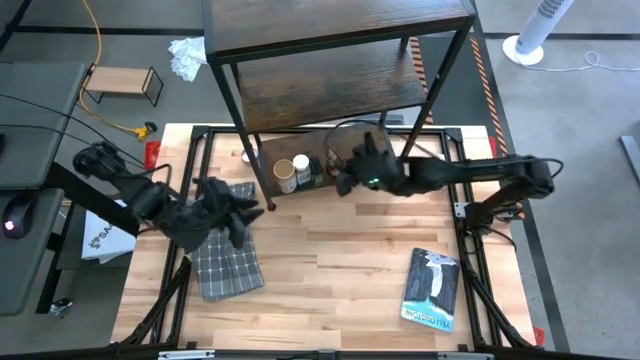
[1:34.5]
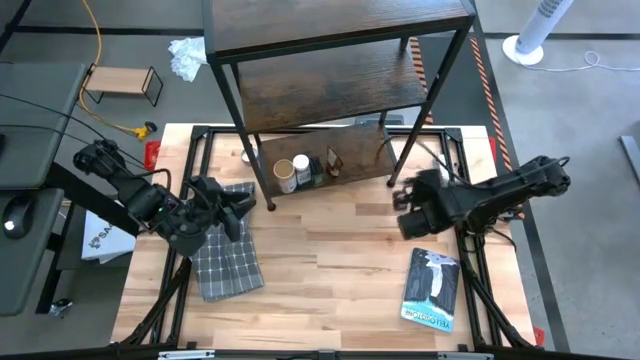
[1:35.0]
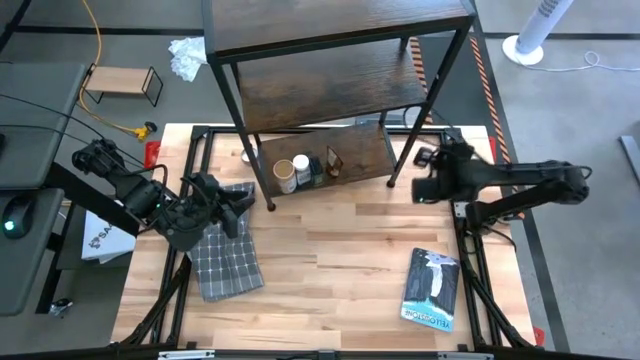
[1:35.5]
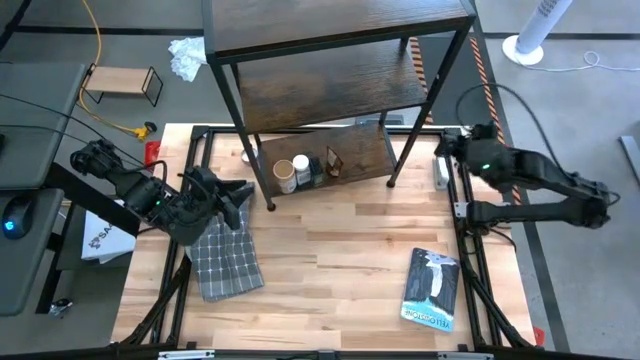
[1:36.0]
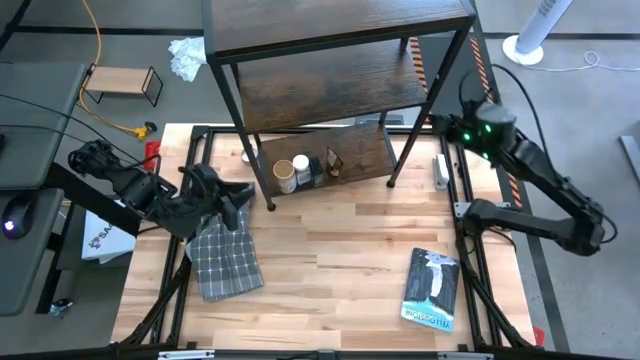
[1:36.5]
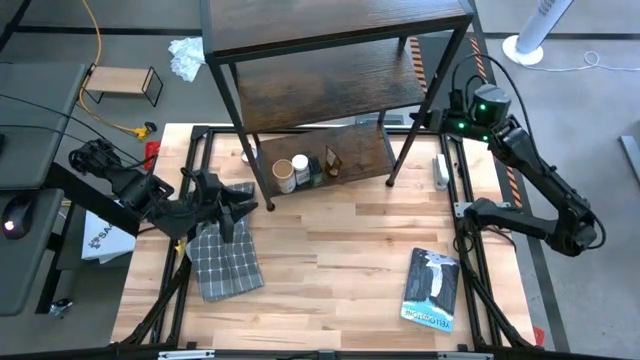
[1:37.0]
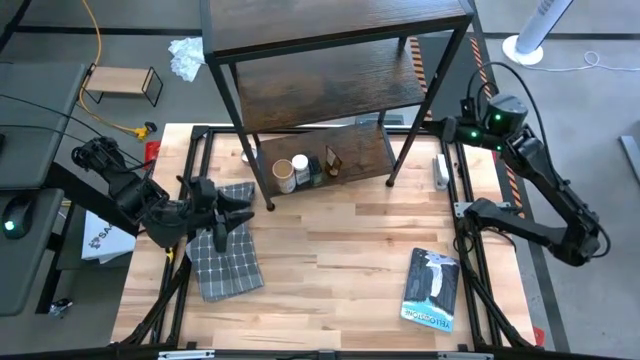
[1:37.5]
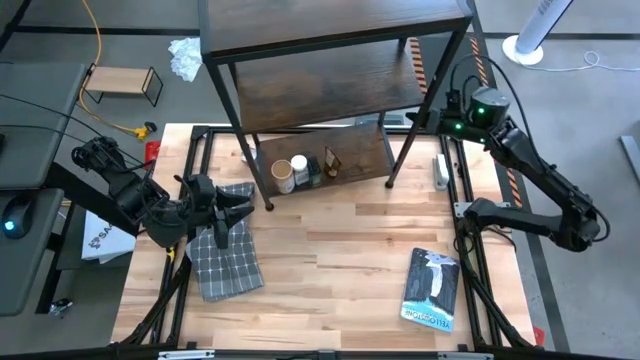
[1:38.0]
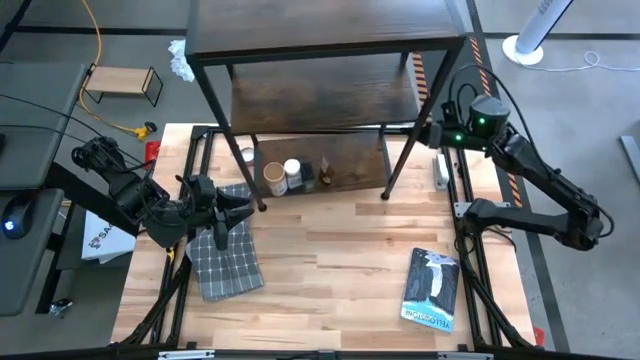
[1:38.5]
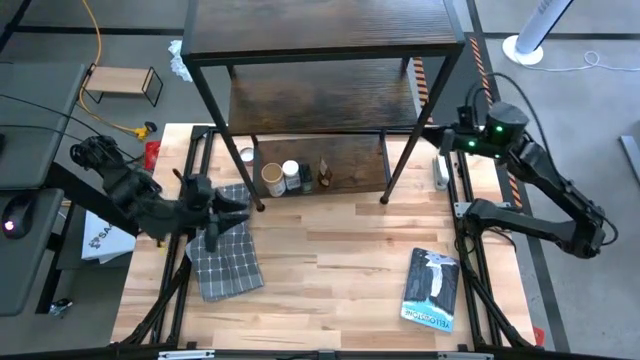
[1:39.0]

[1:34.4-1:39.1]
Task: Shelf spices
Adjust the shelf

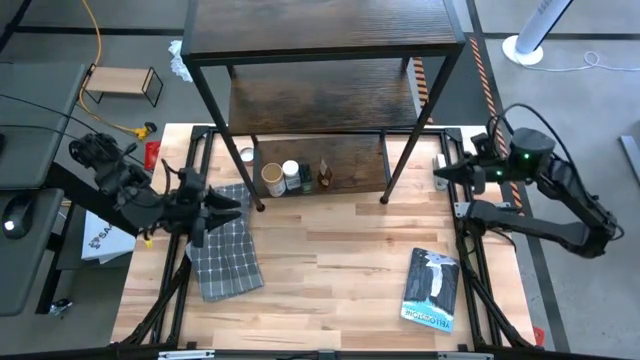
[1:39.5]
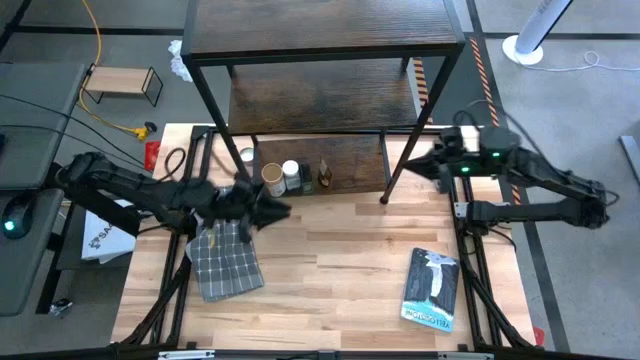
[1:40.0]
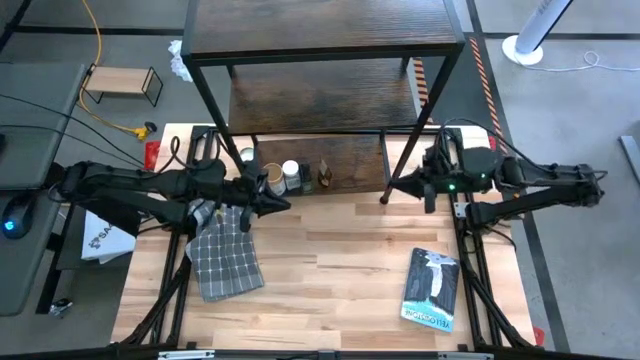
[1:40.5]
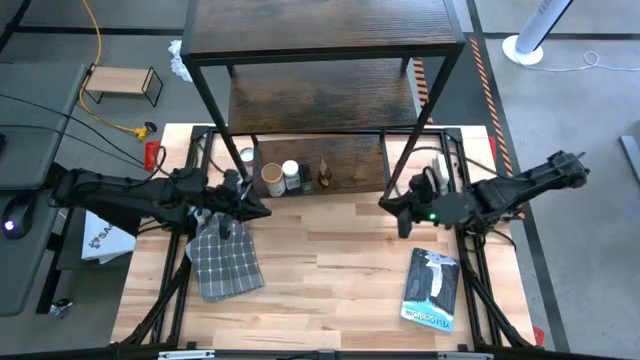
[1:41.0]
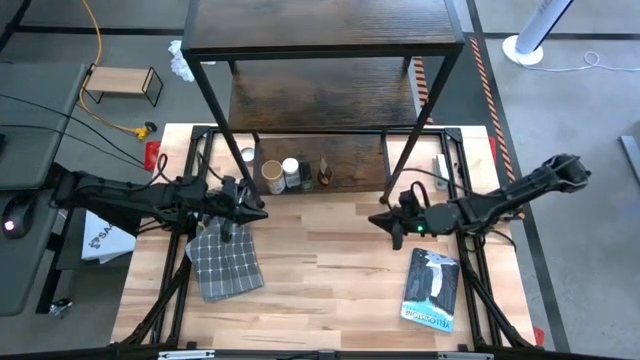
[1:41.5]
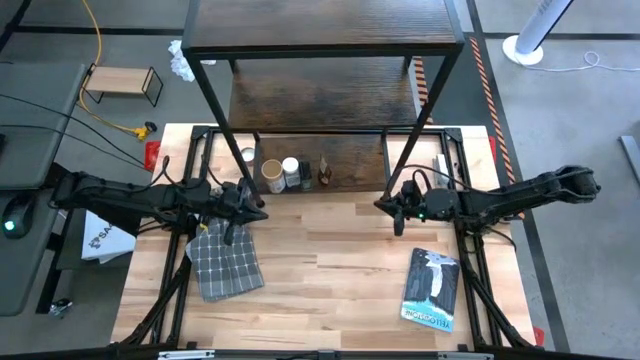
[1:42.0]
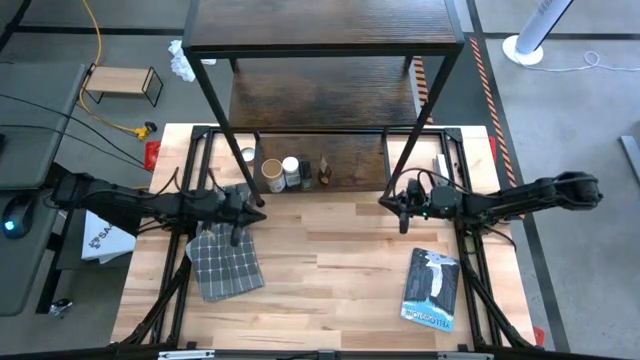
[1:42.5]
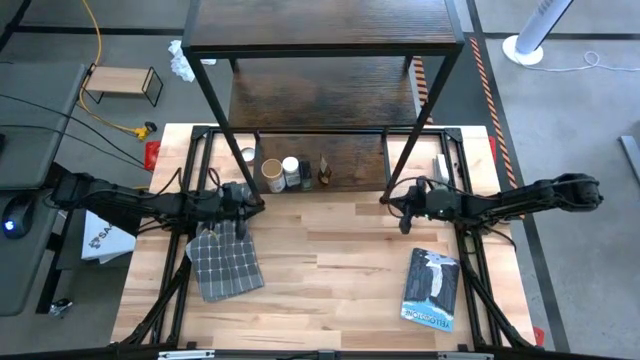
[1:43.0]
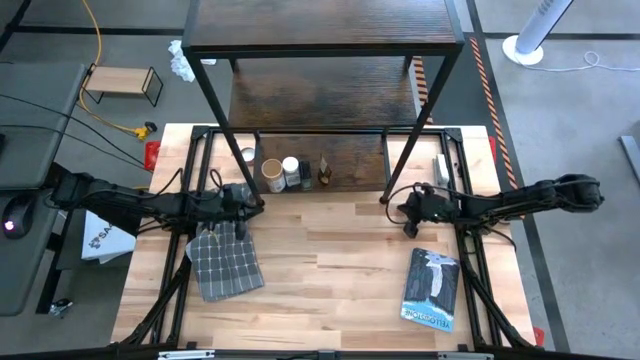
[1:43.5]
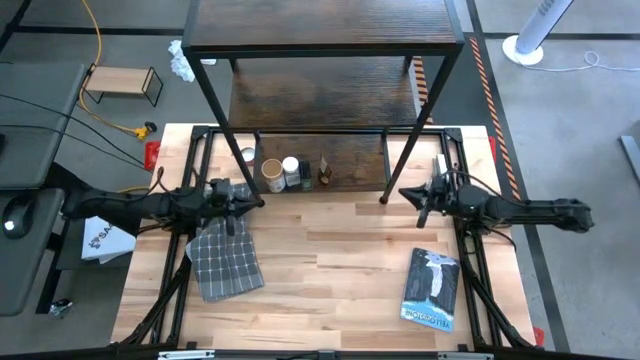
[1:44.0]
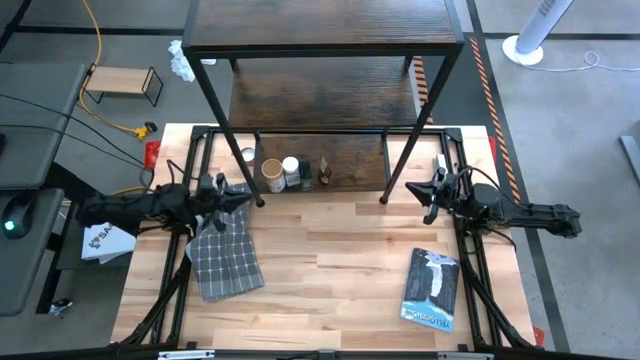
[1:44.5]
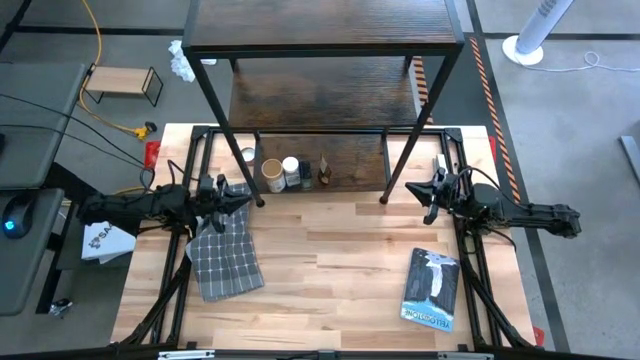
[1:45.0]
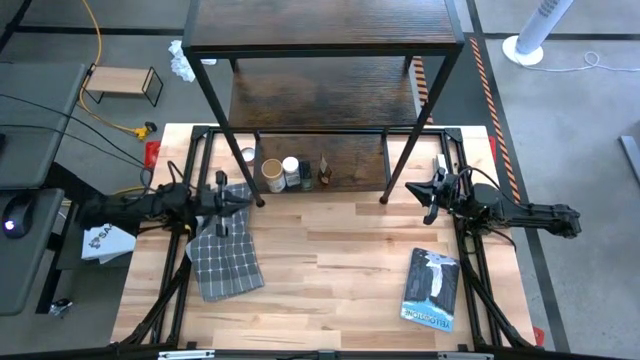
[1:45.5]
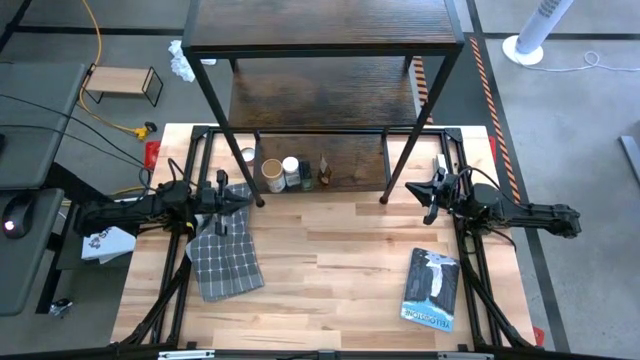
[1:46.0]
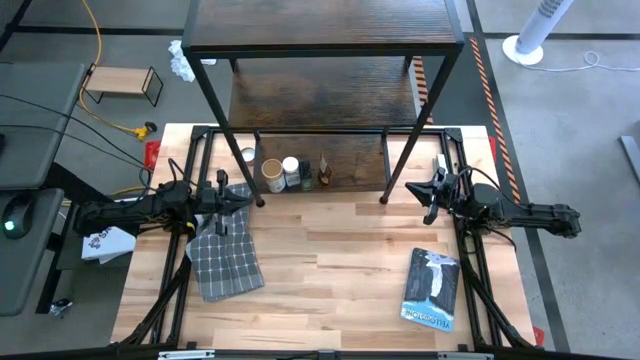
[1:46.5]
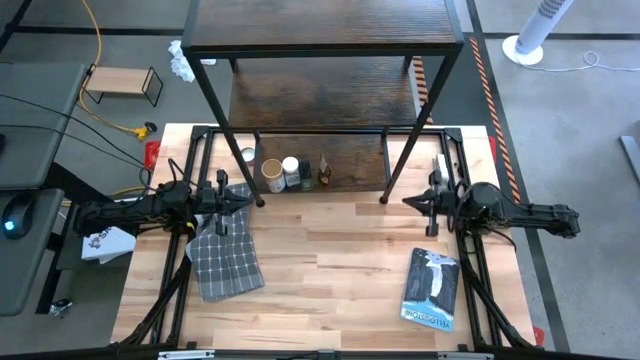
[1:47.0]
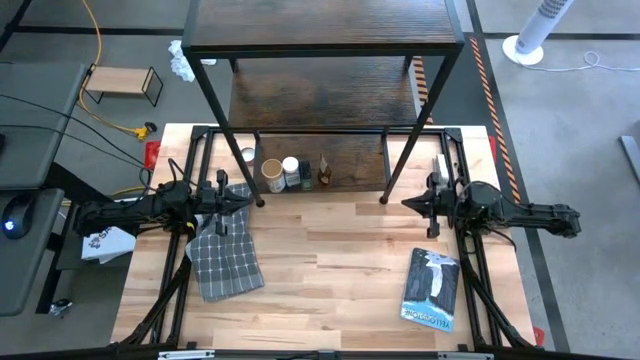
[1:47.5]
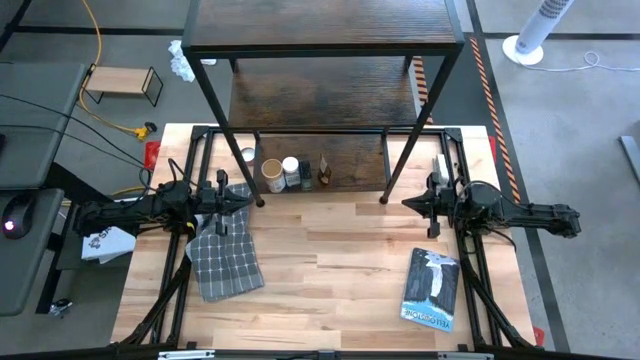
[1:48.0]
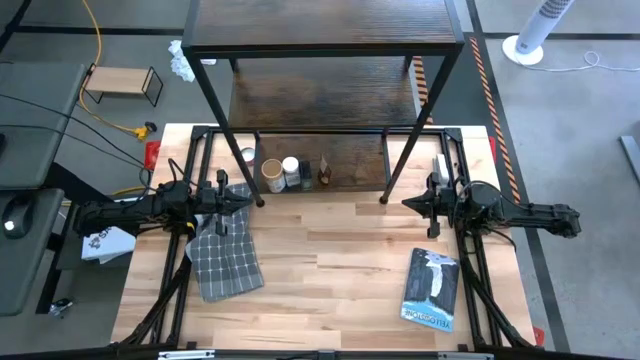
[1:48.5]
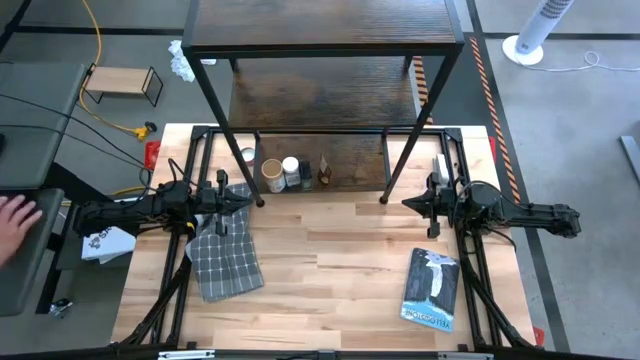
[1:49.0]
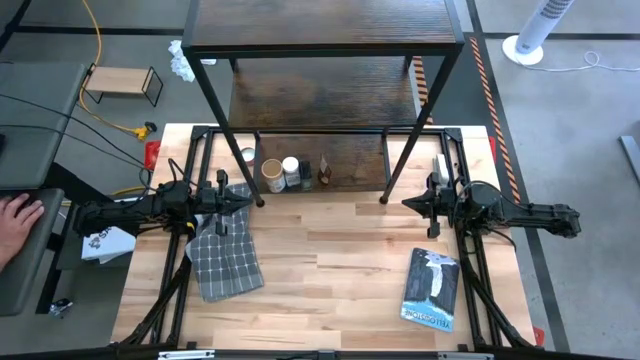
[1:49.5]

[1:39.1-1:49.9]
Return to Home Position

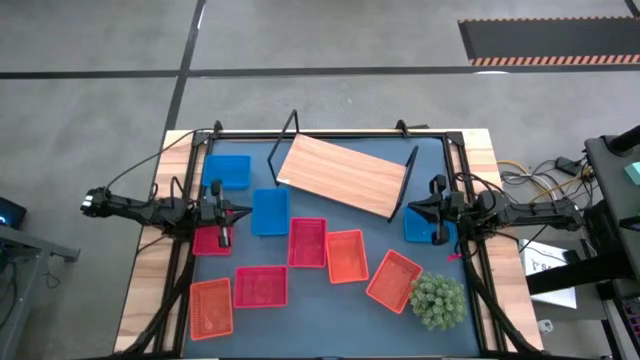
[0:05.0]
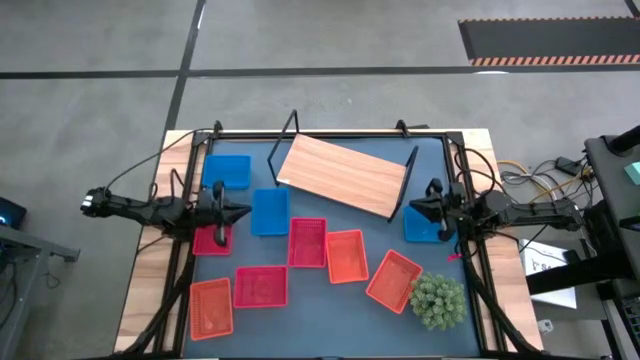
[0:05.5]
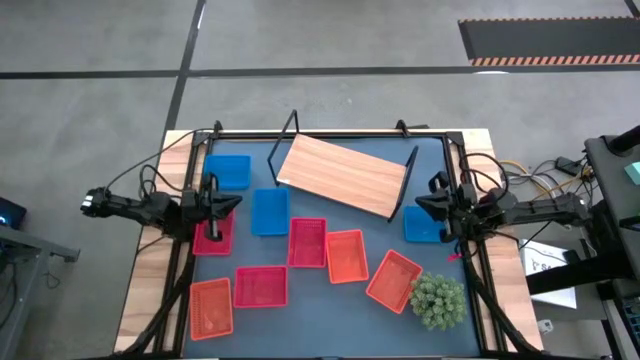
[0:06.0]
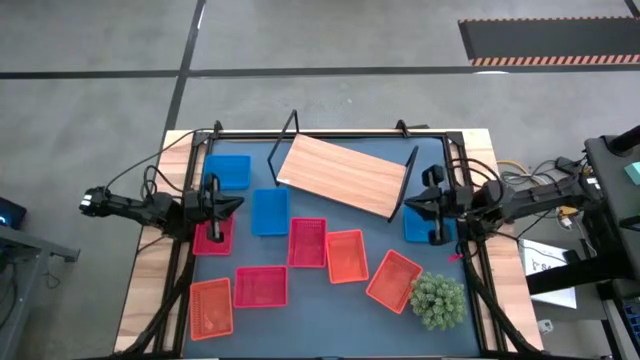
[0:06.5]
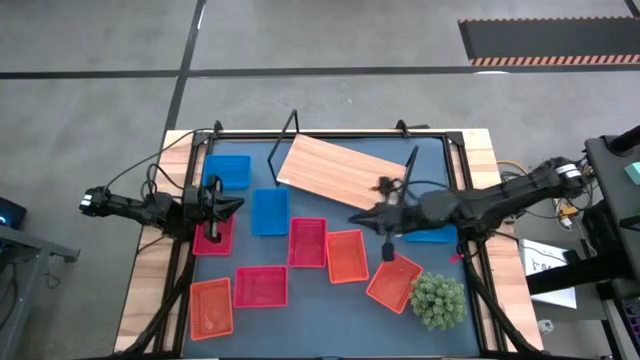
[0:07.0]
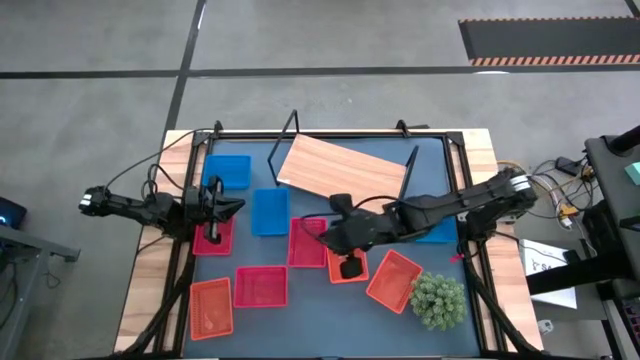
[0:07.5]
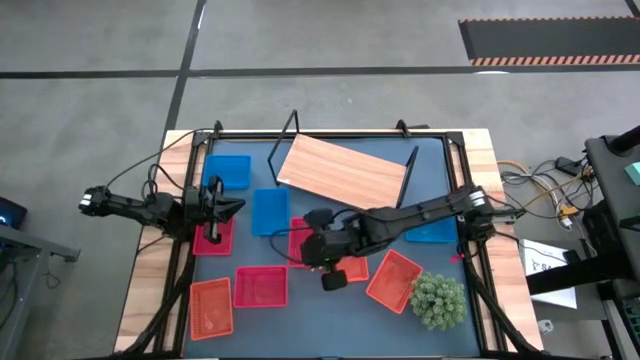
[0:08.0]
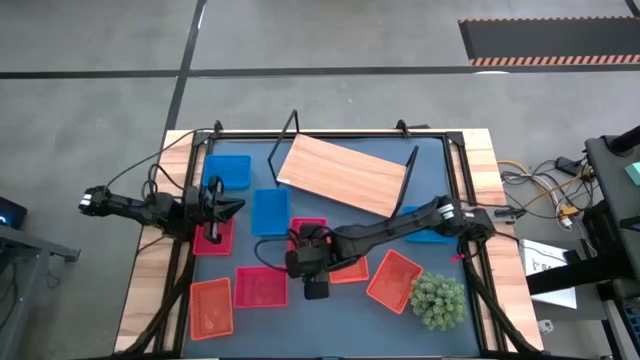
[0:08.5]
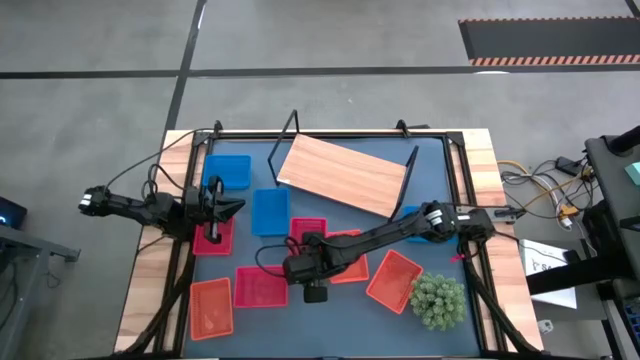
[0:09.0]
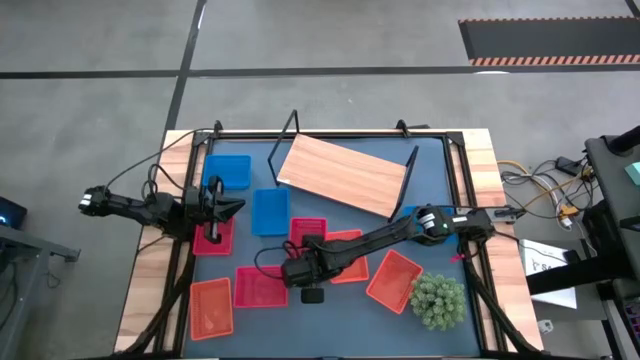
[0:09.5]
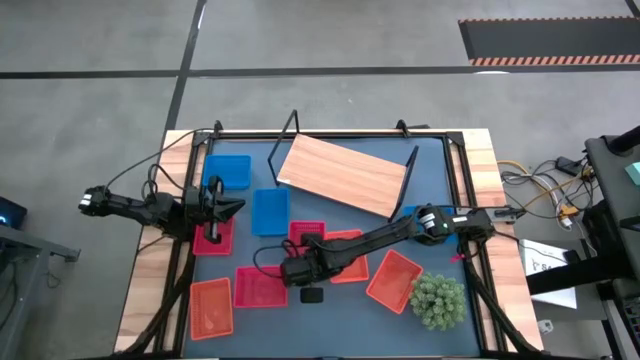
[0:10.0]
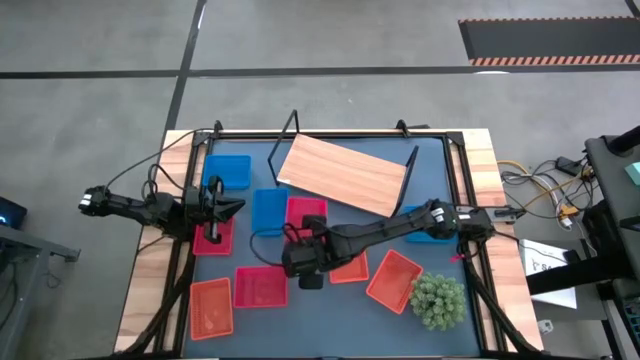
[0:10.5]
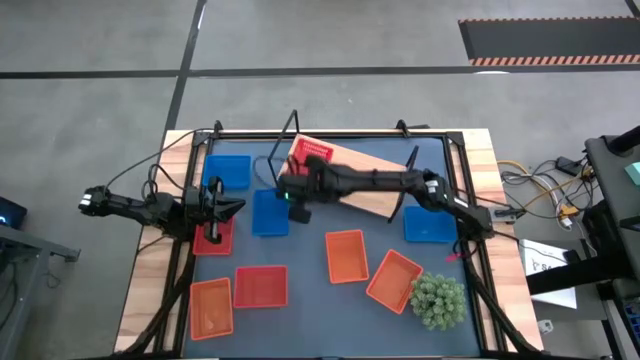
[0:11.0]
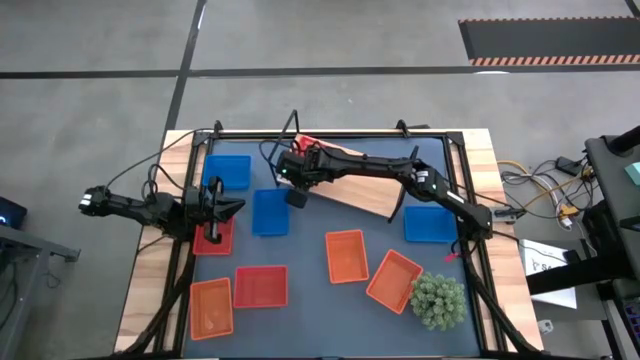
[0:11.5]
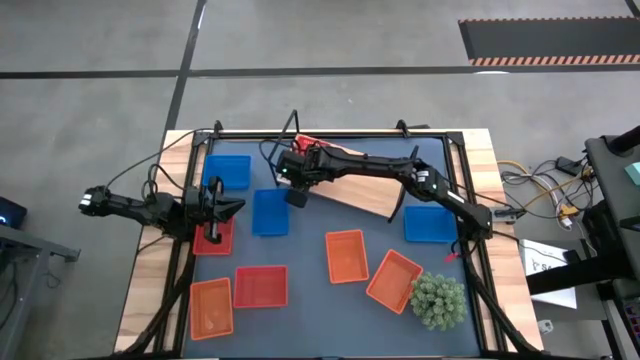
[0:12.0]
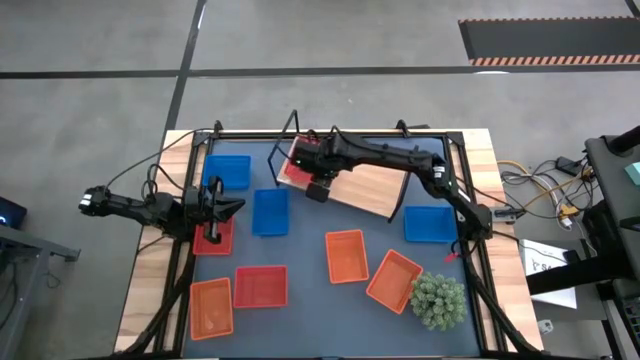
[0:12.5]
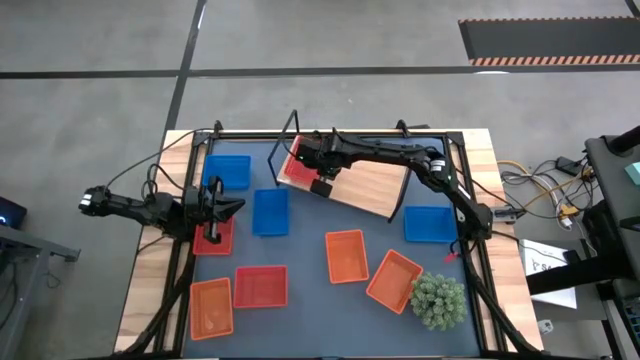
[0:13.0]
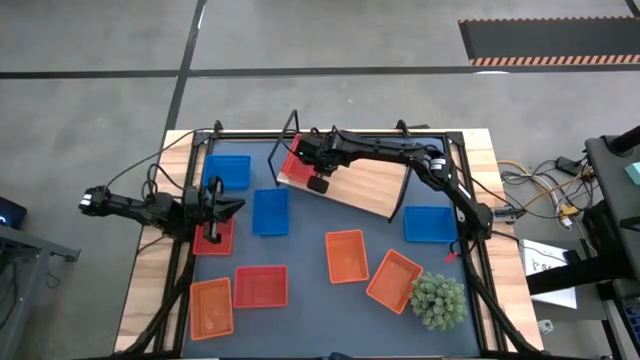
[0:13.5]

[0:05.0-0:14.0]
Task: Stack baskets on shelf by color
Put the top right red bin on the shelf
